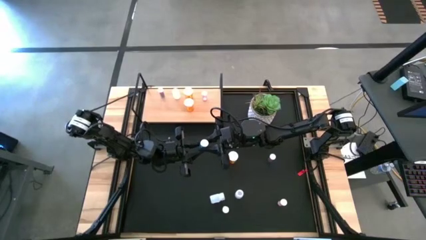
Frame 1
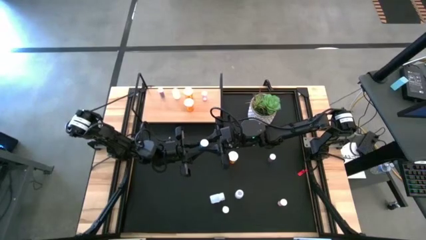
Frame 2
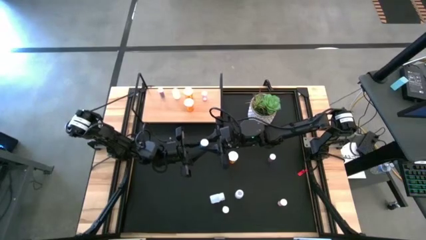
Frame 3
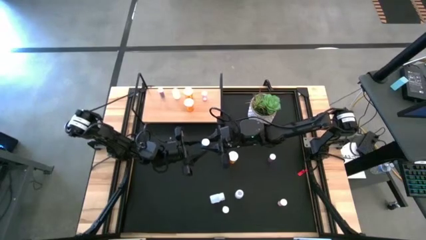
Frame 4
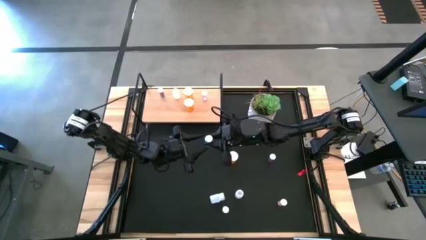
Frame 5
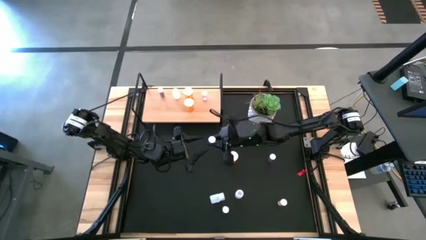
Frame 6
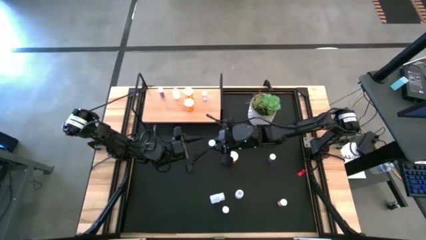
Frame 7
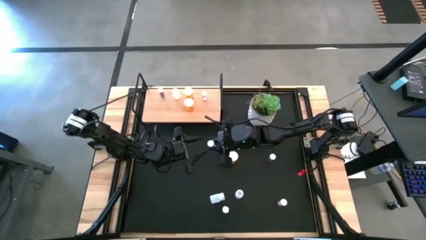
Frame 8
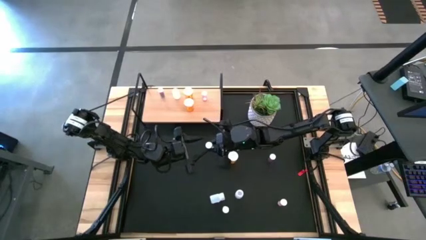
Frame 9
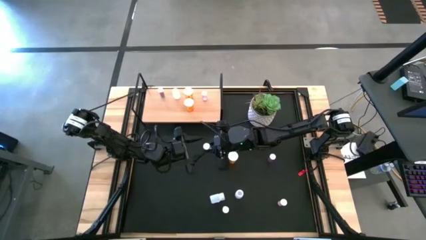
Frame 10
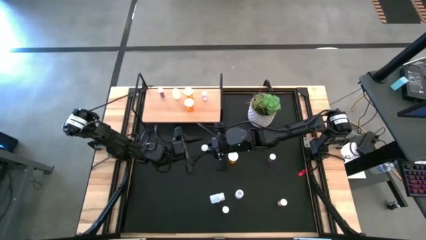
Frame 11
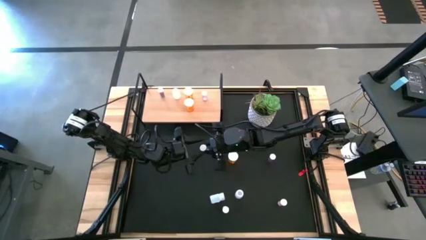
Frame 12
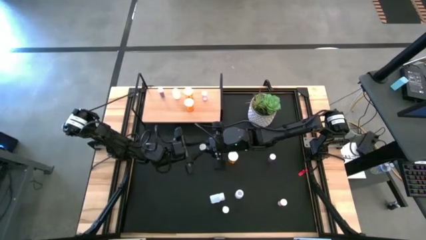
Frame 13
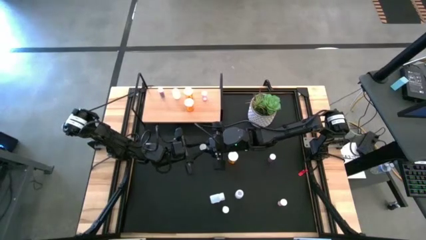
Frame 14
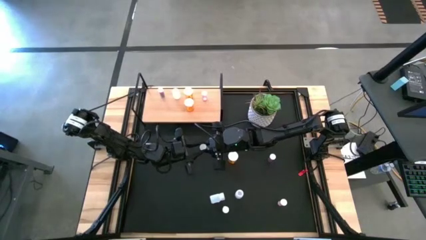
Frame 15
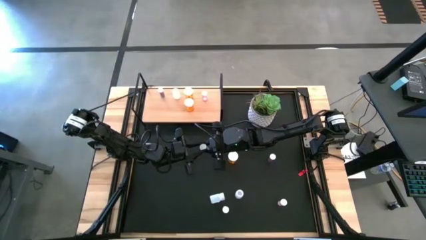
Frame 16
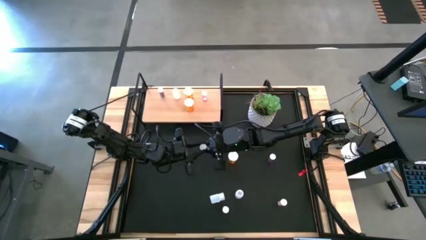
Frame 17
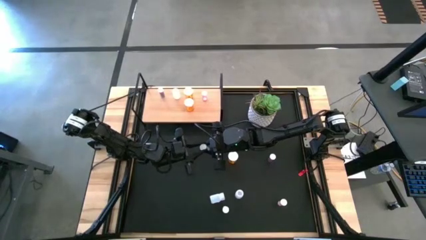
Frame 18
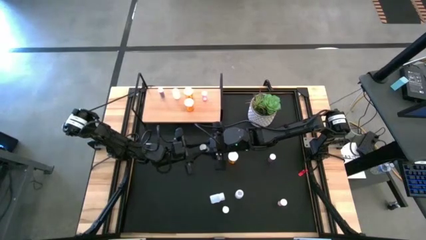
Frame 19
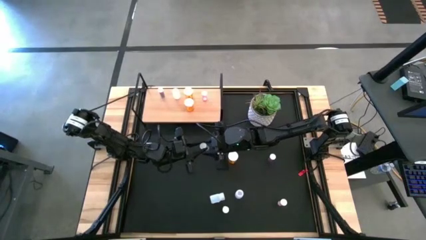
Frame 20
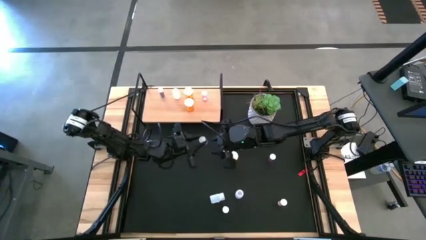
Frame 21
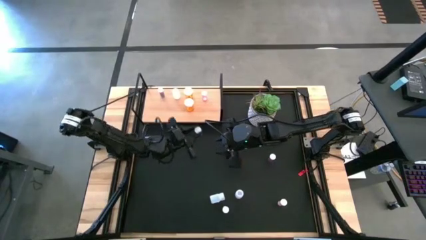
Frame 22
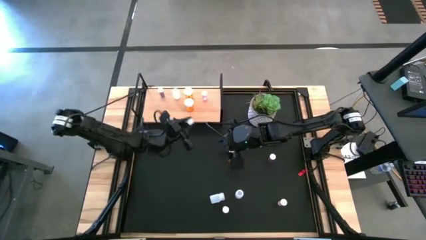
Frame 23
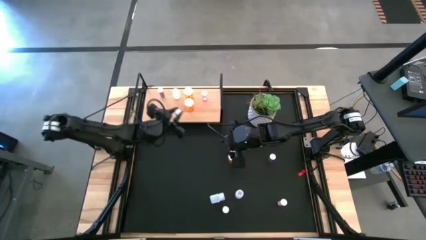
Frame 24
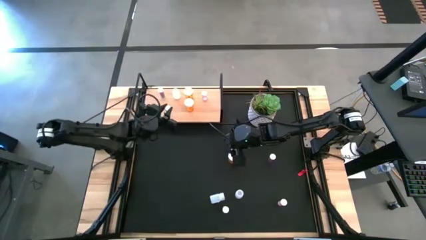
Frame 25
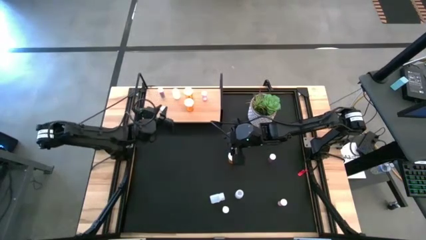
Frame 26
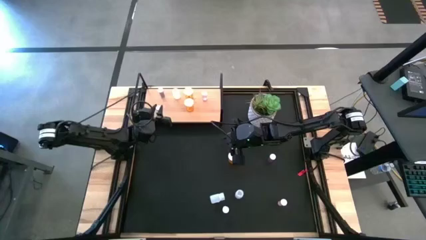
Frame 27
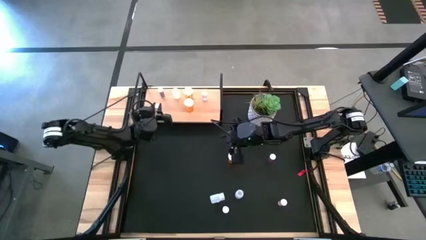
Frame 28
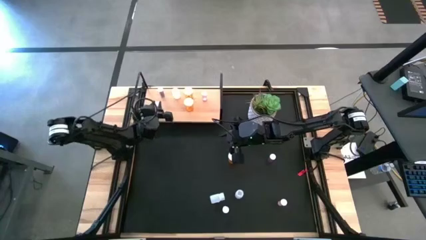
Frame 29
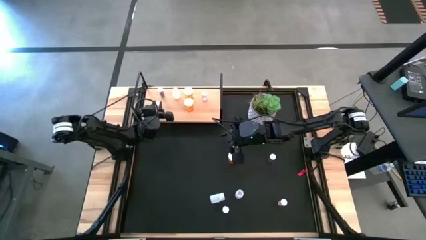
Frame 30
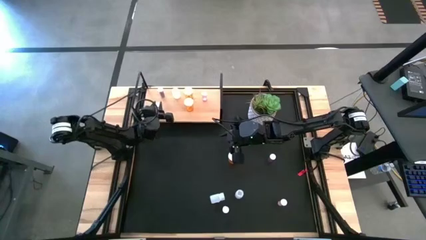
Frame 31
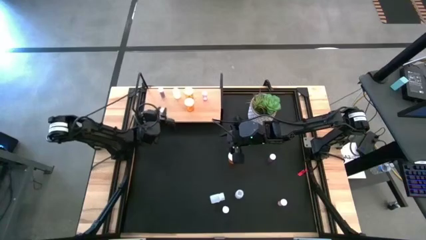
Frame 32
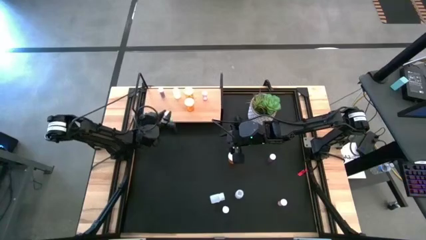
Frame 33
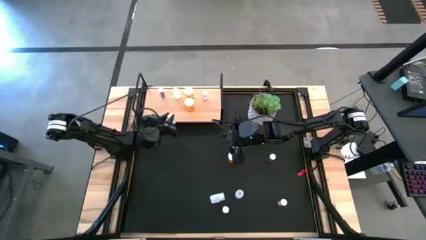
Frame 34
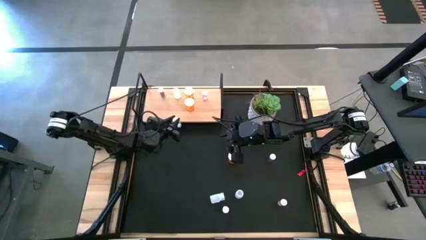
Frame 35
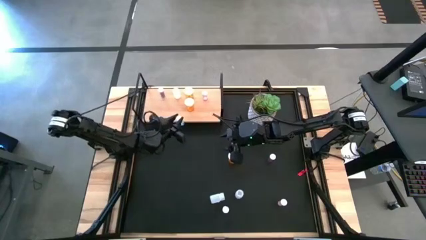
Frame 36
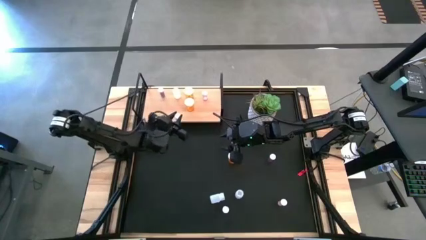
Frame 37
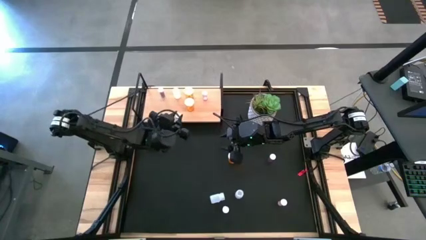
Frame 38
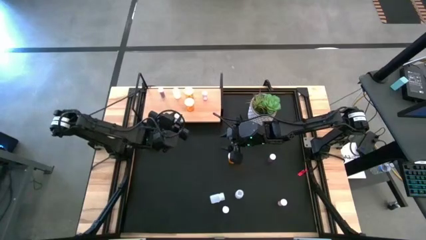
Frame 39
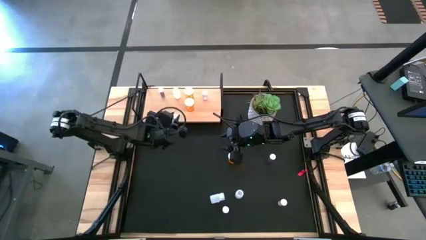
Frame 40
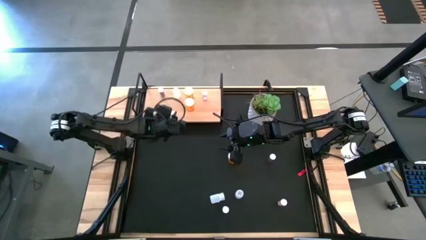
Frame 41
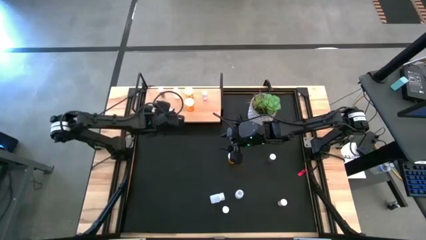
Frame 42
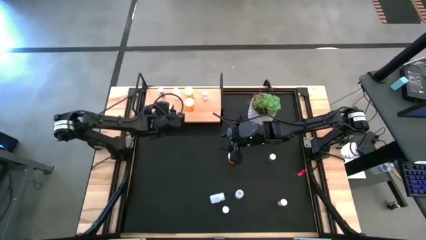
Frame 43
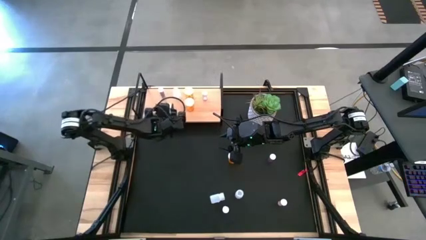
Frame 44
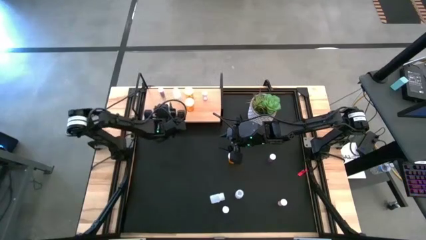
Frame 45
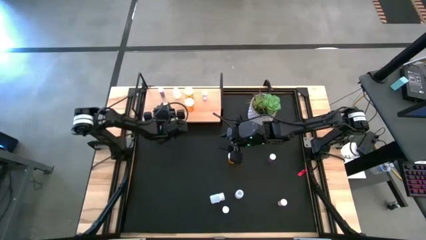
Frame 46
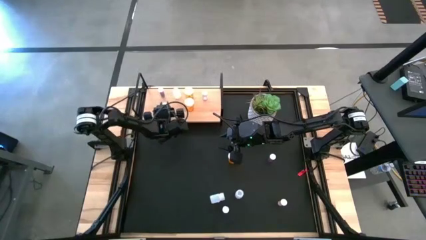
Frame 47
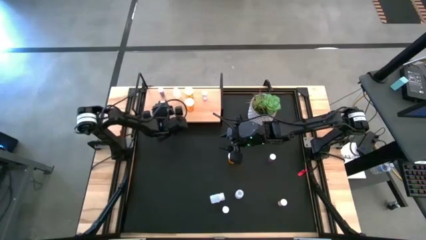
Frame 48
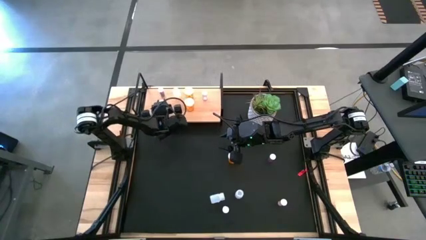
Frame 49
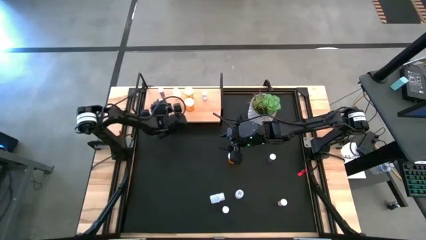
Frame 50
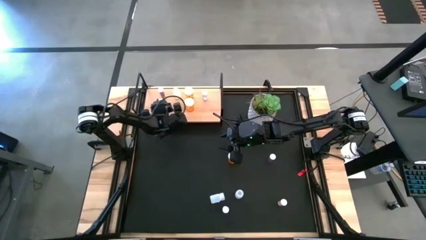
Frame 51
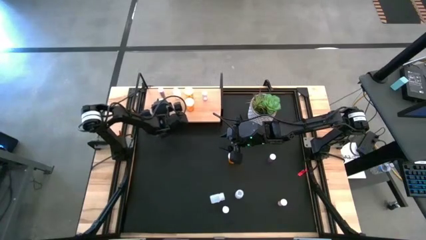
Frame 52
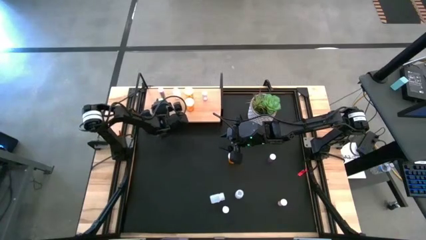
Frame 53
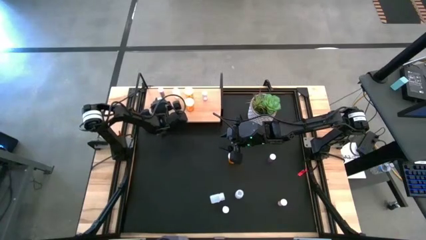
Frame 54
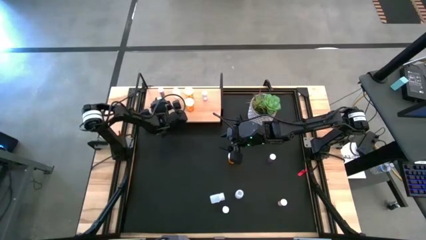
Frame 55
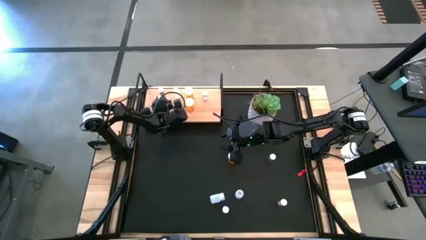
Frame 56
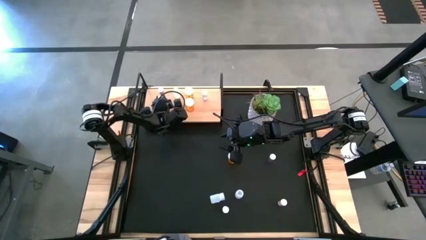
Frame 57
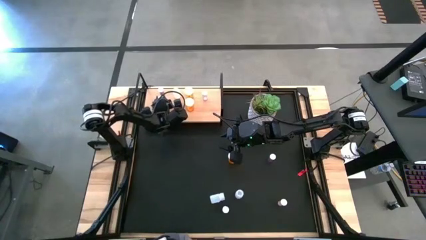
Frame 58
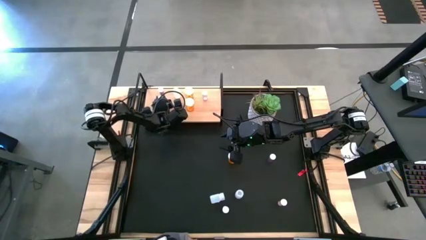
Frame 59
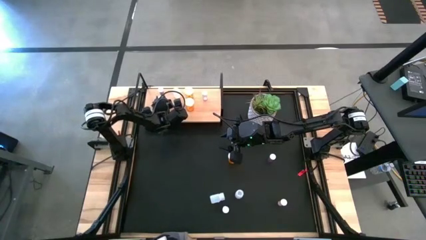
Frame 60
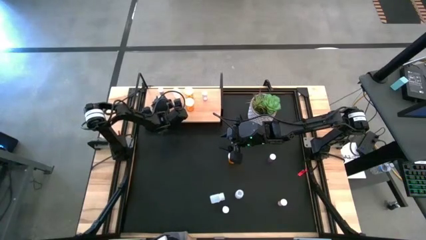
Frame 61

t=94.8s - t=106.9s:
Task: Pick and place medicine bottles onto shelf by color
Put the left blue pill bottle on the shelf aligned with the other blue pill bottle
